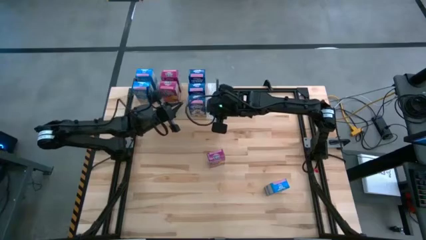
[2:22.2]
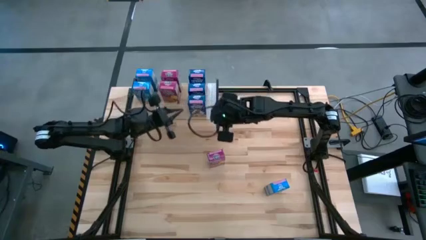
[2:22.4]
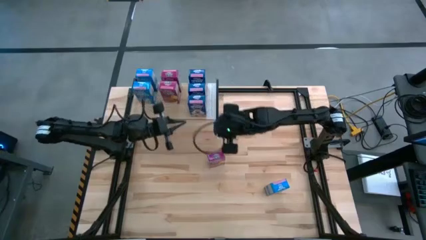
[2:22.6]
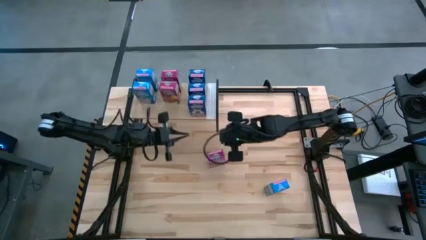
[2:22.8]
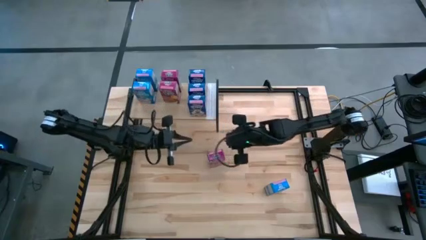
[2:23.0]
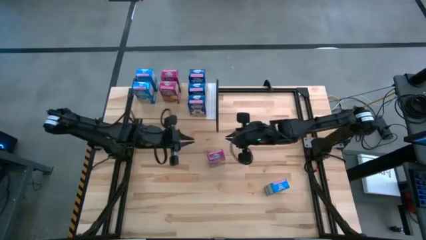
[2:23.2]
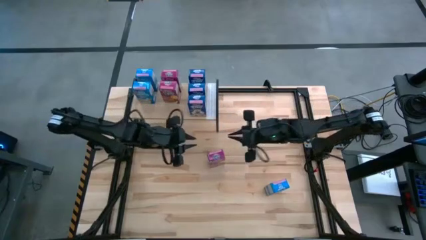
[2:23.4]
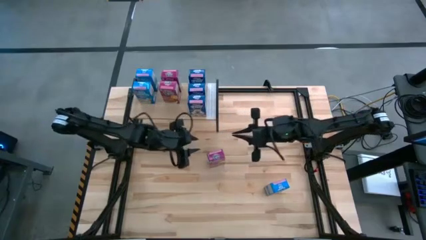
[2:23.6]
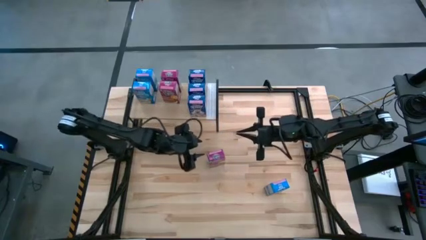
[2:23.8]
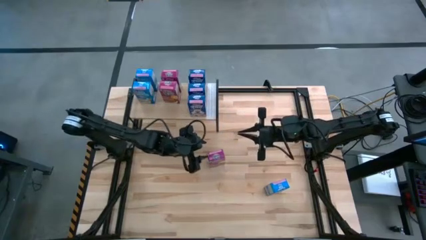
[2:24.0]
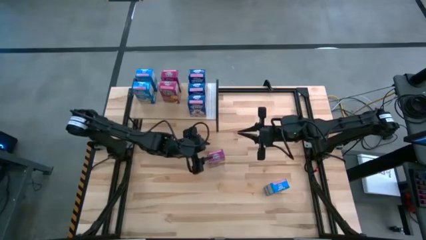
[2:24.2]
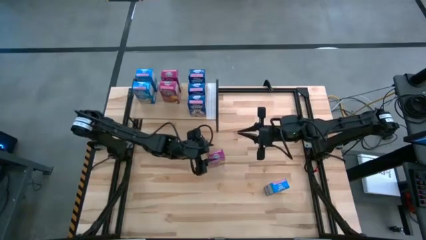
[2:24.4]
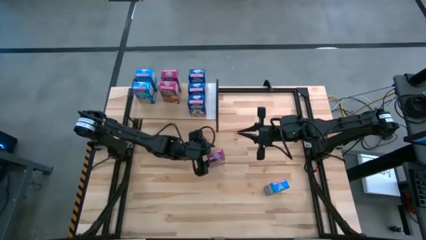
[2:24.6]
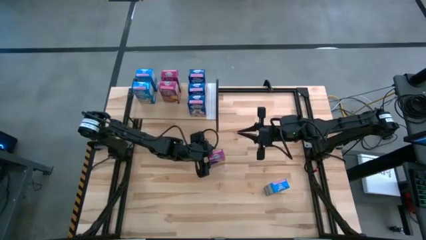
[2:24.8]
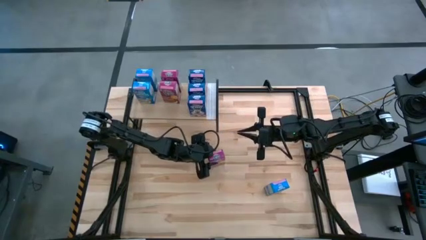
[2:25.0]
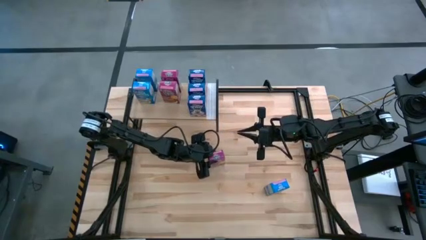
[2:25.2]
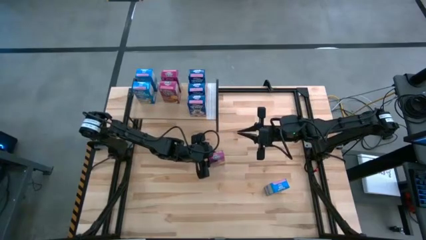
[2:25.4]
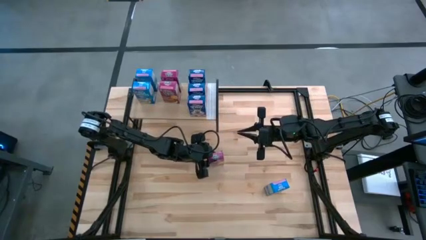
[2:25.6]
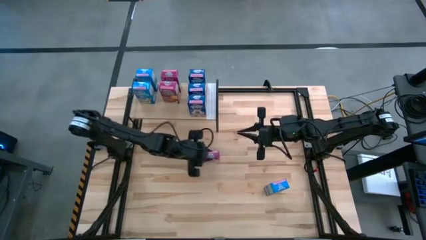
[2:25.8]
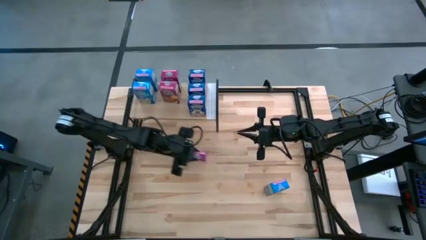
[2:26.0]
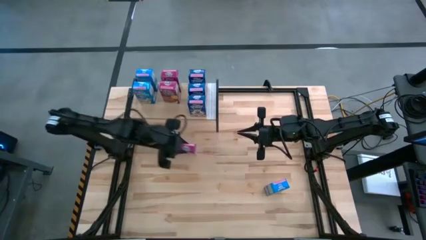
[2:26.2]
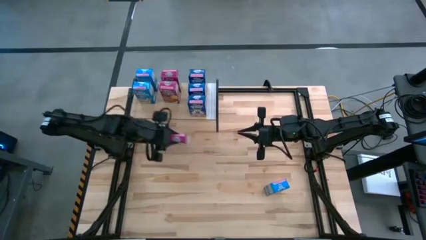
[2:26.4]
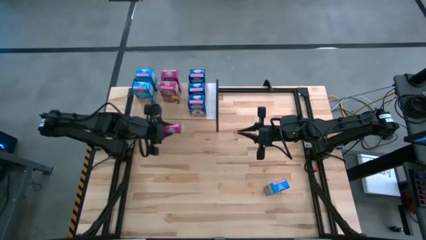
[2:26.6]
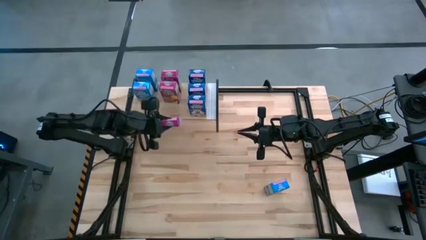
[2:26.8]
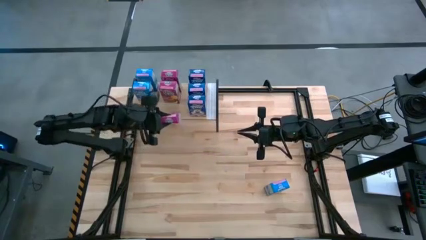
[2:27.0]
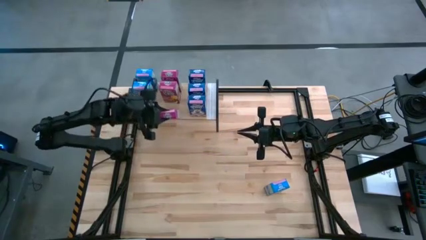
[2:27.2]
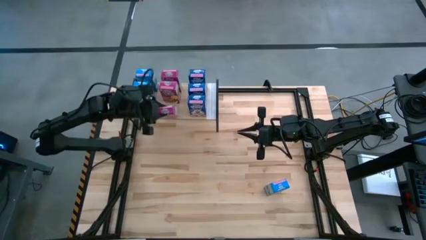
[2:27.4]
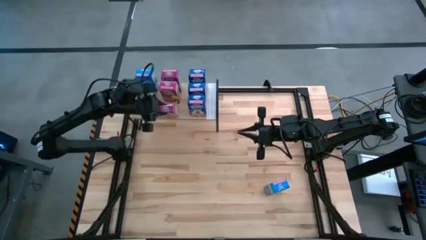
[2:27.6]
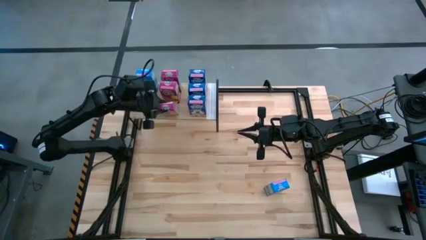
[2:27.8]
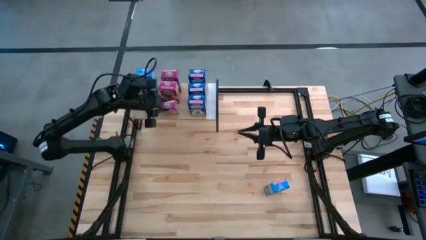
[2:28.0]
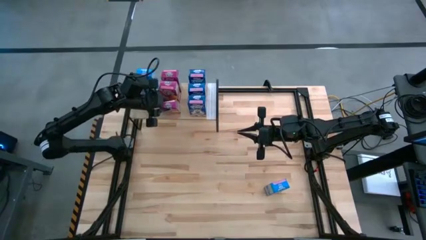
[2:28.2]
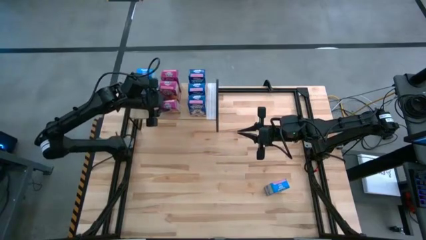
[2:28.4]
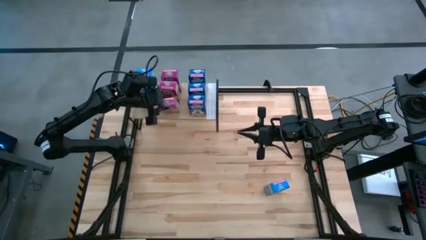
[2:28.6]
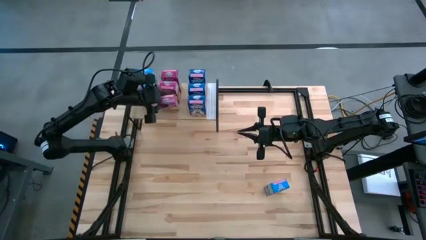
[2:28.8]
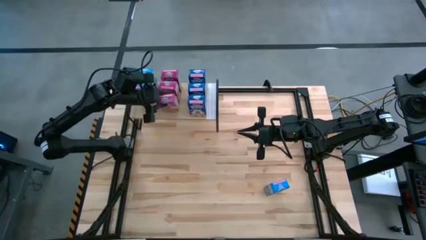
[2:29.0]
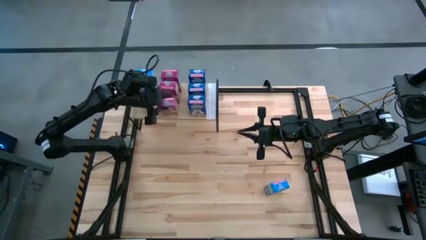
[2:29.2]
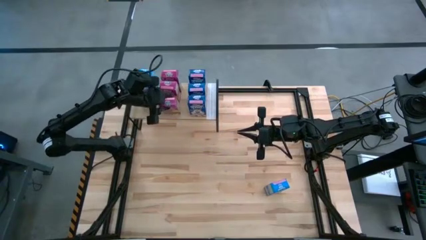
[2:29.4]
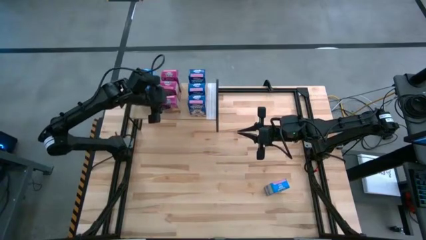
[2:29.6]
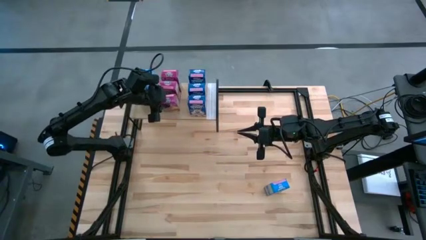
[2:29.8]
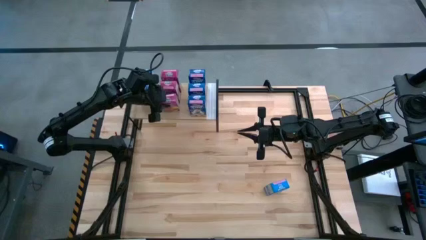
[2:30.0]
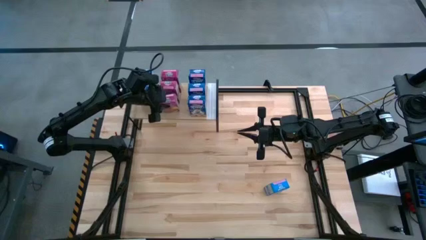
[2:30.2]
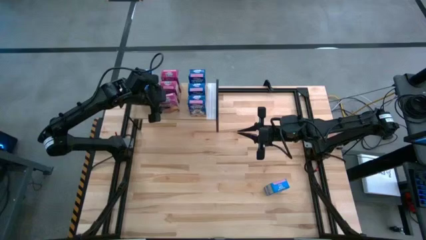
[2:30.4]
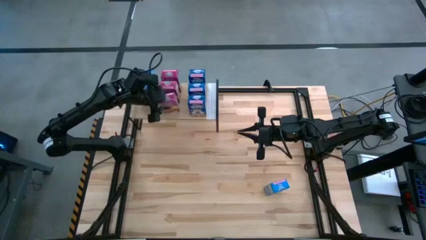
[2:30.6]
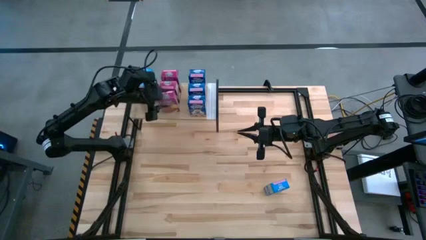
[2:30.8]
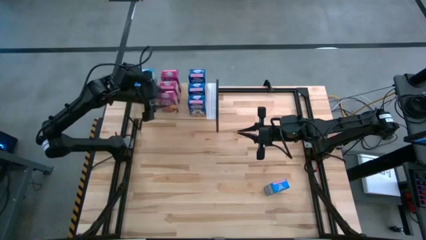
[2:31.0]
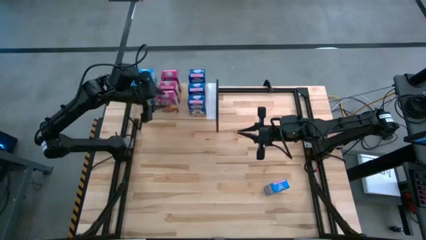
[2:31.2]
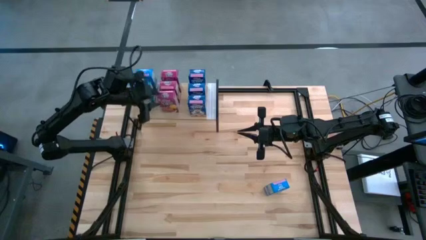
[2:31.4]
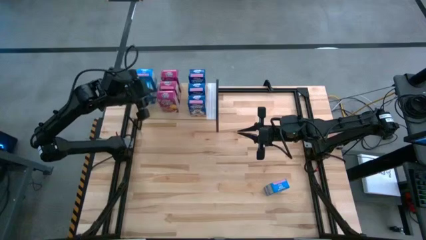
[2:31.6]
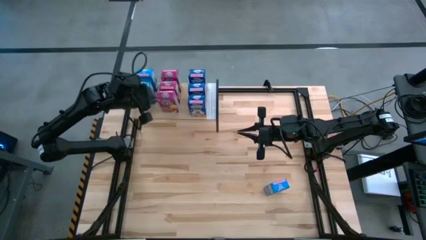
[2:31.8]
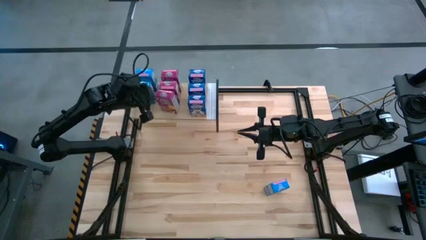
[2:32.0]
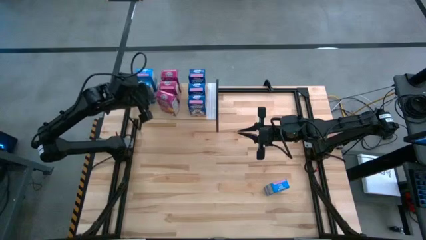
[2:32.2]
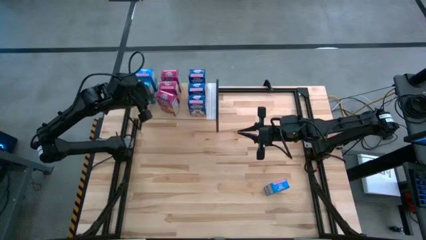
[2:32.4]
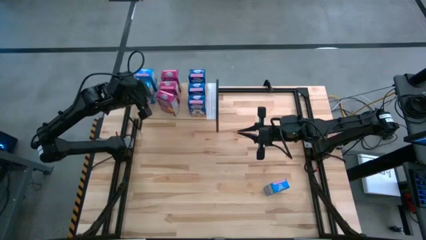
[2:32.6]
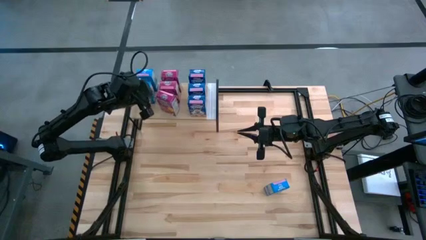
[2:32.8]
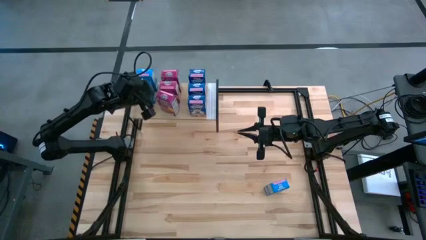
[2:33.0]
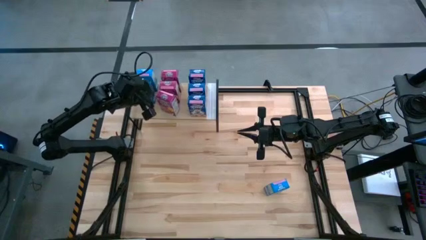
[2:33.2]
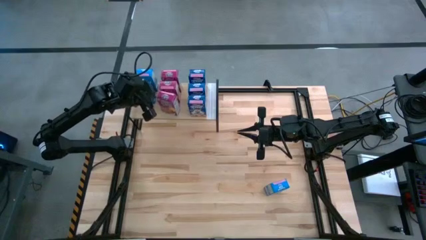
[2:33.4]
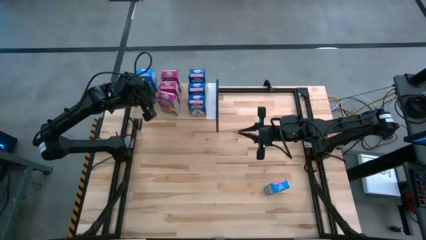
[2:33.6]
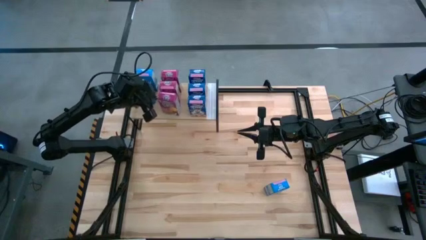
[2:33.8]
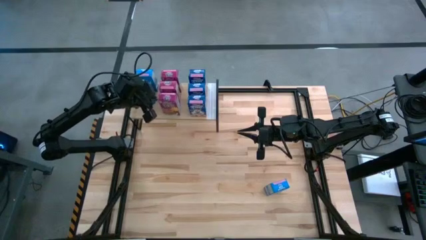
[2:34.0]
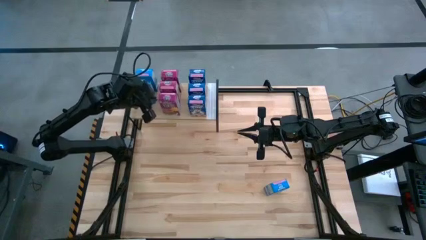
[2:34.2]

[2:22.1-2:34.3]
Task: Stack cereal on shelf
Put the pink cereal box on the shelf

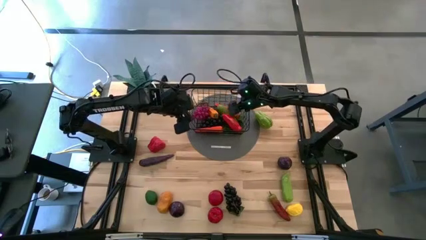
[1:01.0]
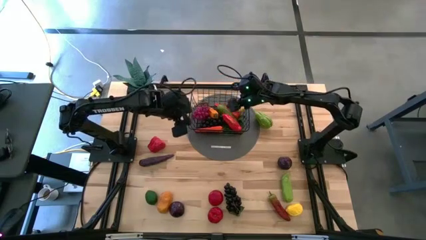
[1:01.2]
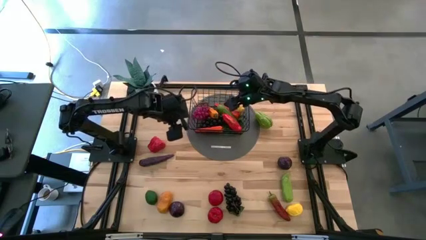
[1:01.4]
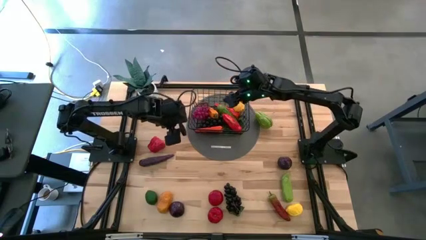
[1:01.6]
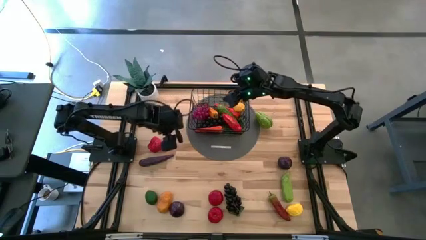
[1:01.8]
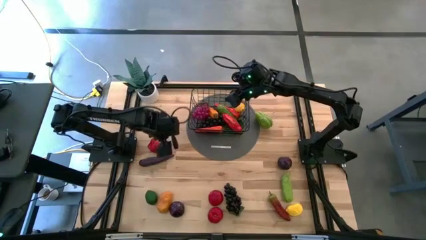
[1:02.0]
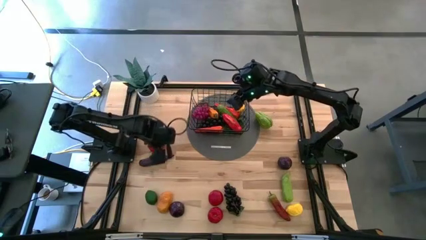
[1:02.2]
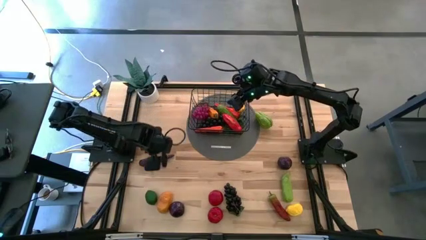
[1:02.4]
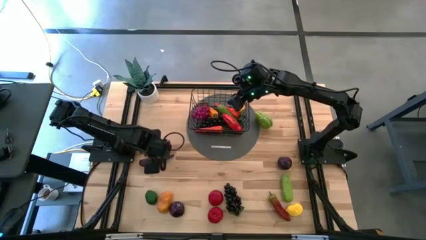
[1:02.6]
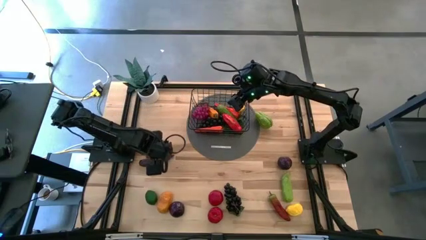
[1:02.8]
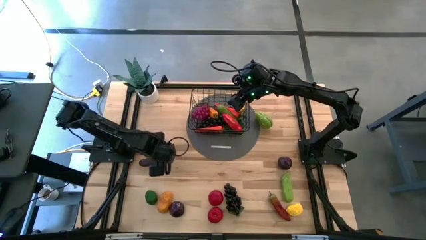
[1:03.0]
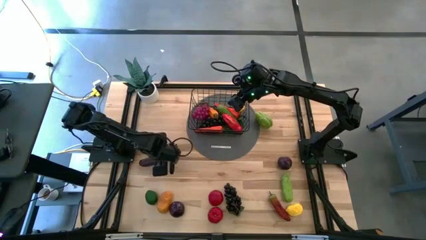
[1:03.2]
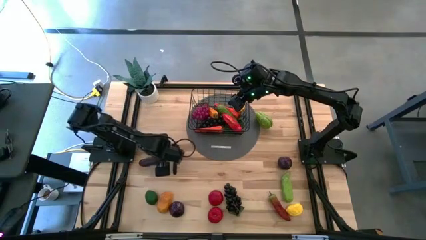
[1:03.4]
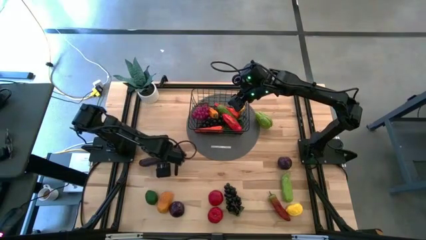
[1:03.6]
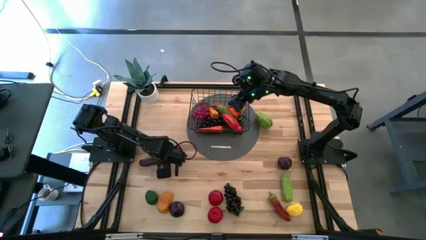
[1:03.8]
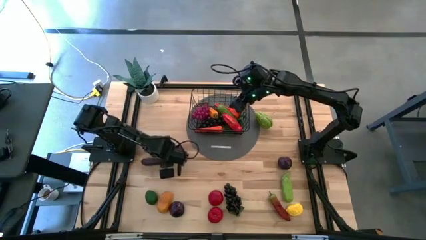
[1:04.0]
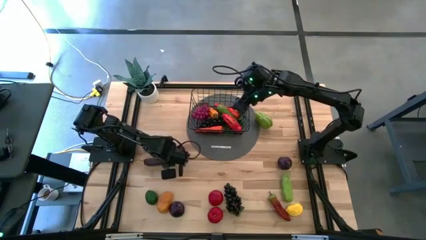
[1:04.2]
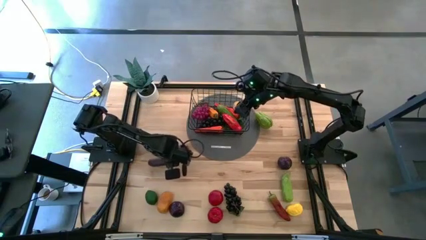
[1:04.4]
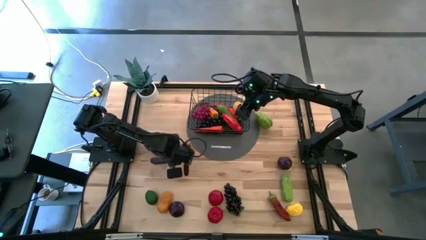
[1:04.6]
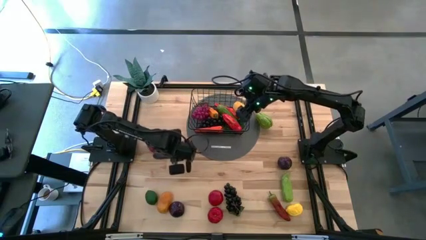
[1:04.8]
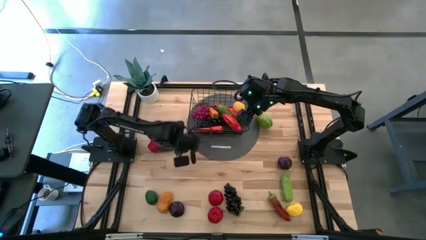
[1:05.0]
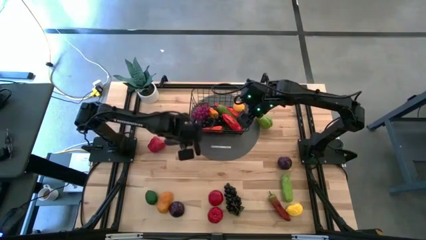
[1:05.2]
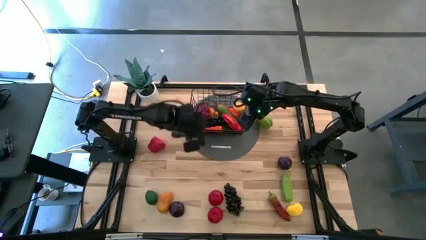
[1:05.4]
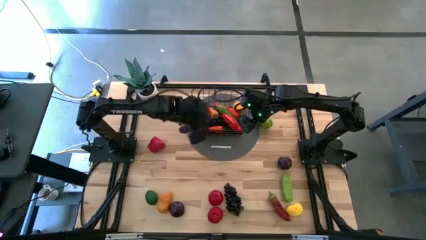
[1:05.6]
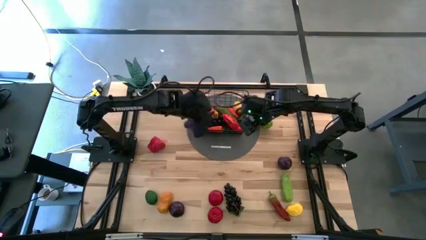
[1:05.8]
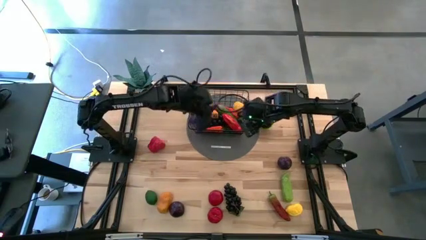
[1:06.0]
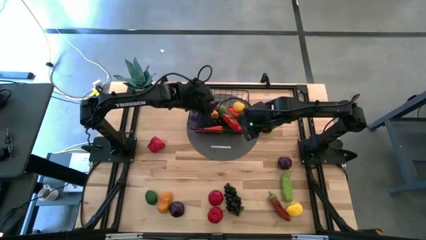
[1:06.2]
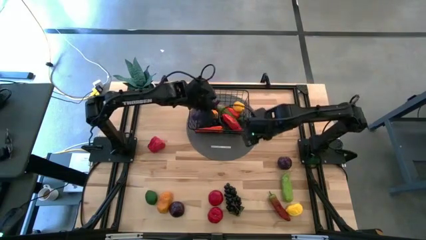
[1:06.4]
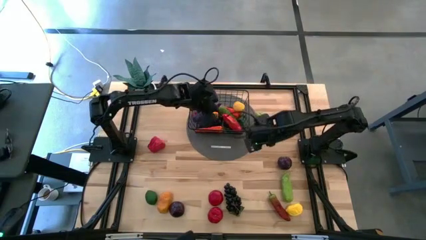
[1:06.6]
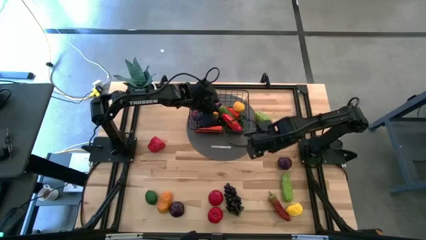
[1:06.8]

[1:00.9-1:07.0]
Task: Build produce basket
Put the violet eggplant into the wire basket
